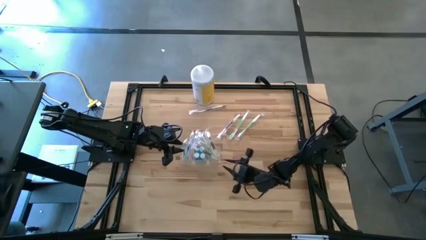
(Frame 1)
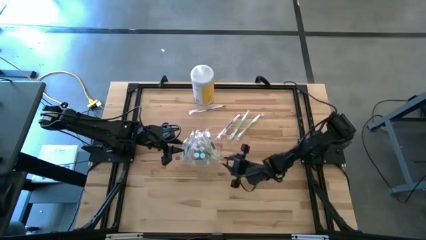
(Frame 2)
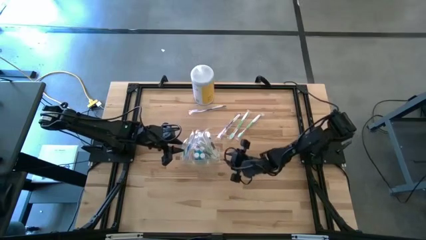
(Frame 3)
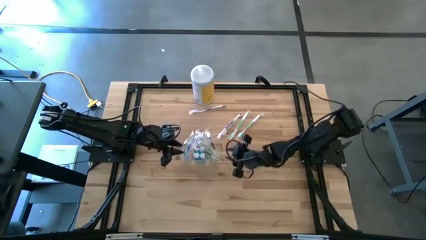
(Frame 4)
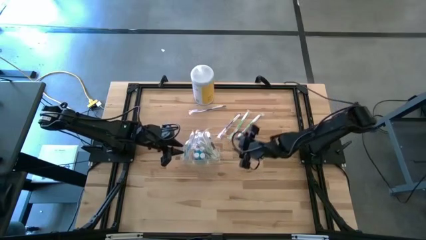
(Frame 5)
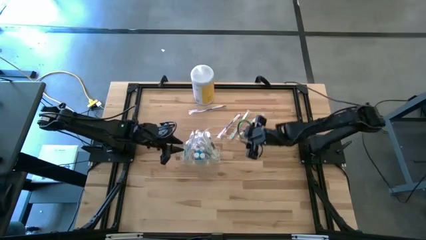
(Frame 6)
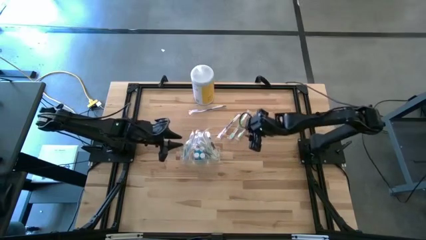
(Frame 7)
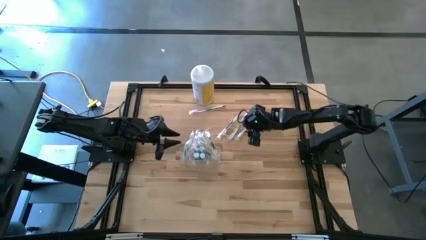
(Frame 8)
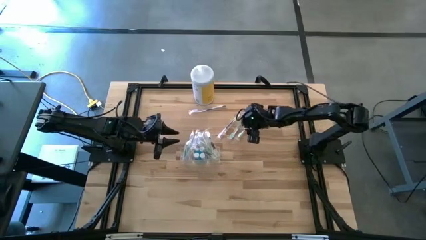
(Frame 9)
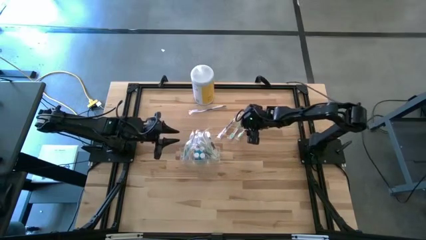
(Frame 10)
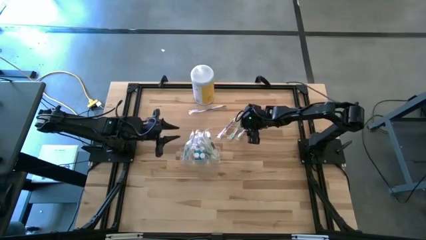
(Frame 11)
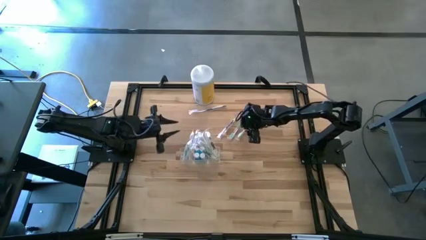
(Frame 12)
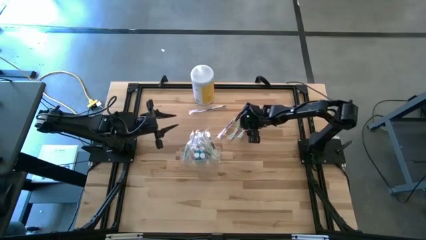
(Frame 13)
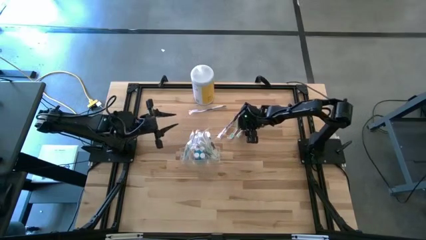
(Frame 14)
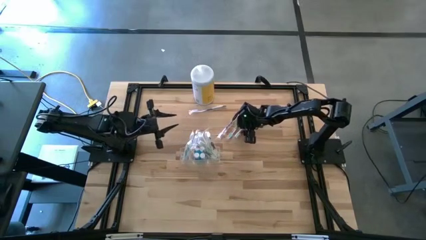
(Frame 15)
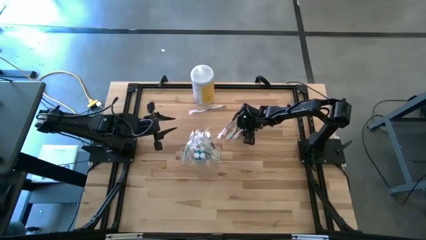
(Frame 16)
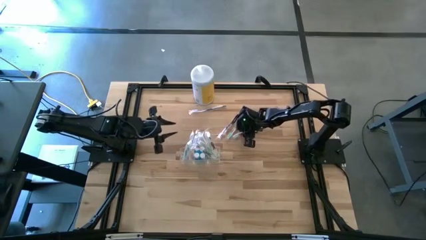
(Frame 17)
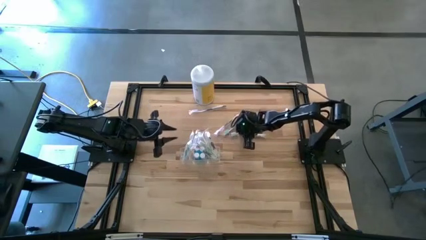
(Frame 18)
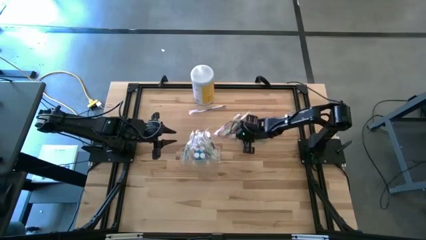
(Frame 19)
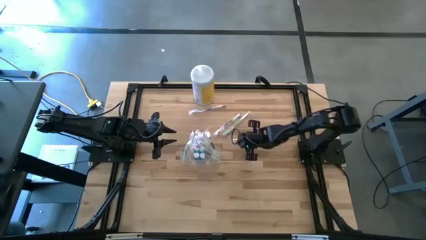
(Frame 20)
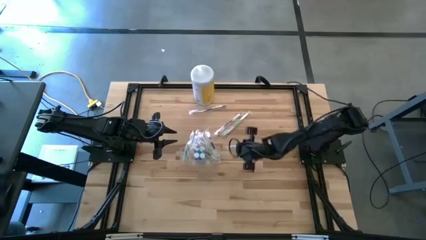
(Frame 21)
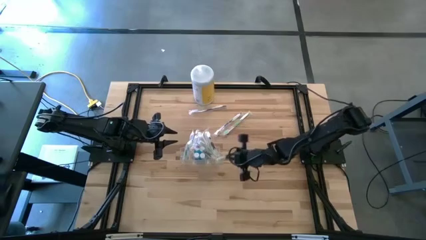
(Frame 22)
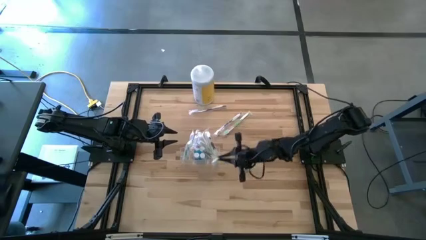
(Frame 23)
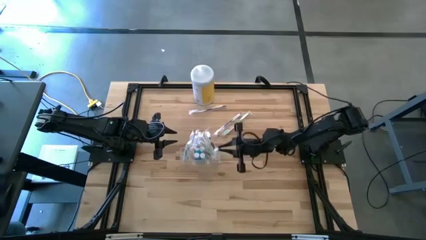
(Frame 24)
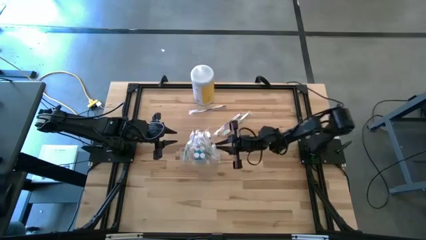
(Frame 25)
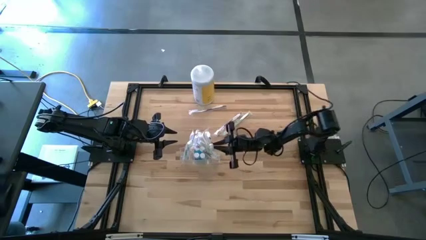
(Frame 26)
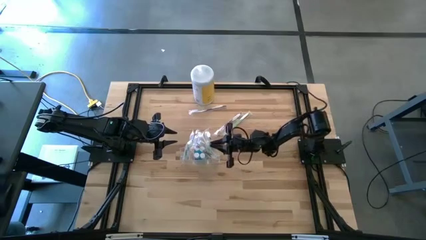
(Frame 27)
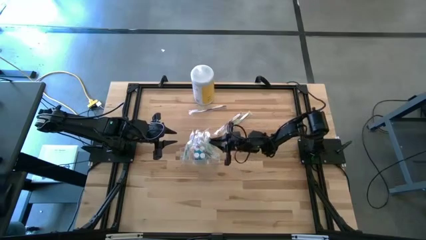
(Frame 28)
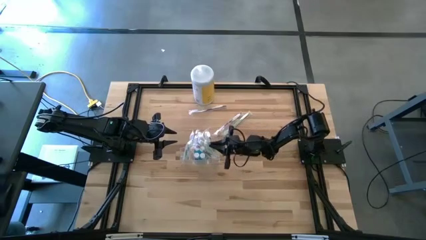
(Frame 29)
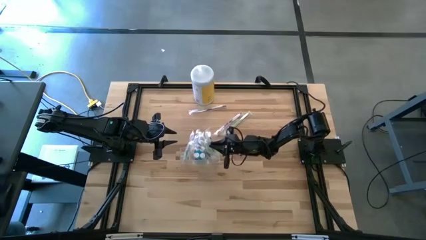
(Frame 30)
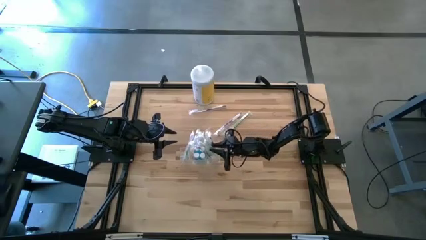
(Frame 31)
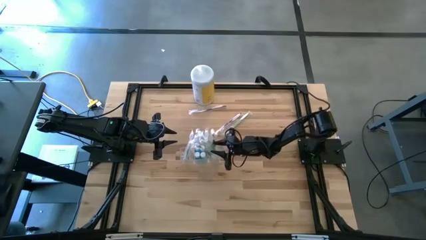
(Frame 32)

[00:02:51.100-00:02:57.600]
Task: Pick & Place toothbrushing station
Put the green toothbrush into the transparent organizer

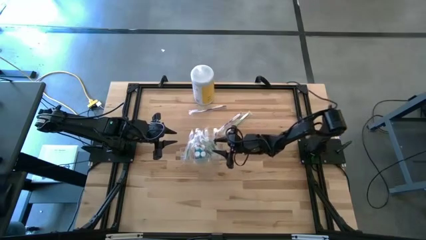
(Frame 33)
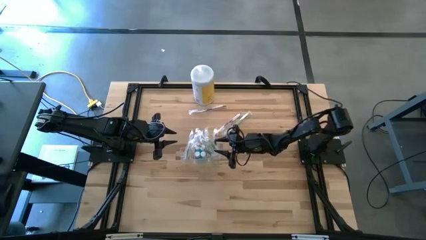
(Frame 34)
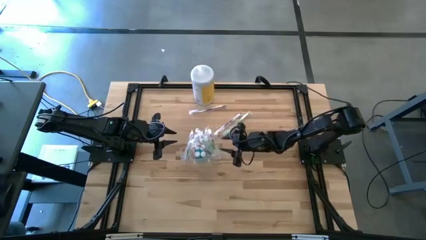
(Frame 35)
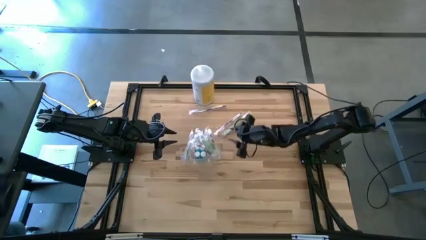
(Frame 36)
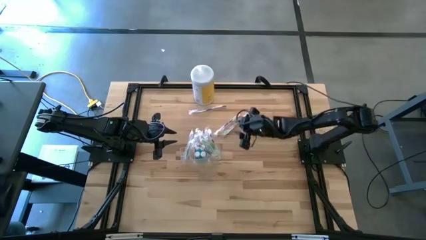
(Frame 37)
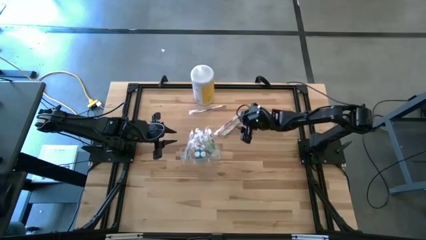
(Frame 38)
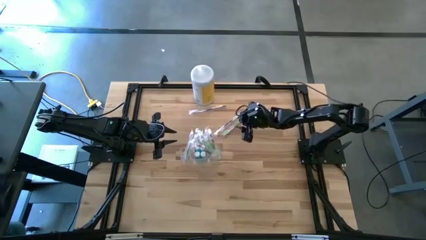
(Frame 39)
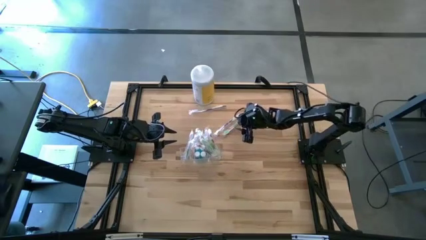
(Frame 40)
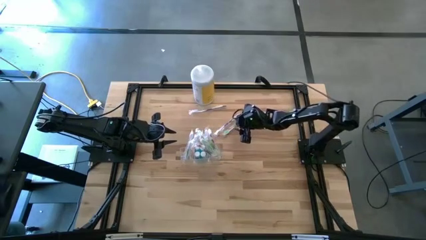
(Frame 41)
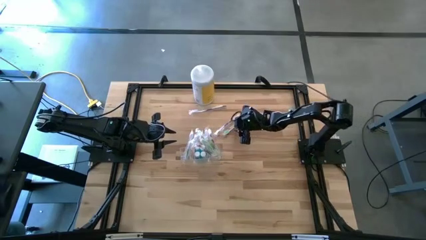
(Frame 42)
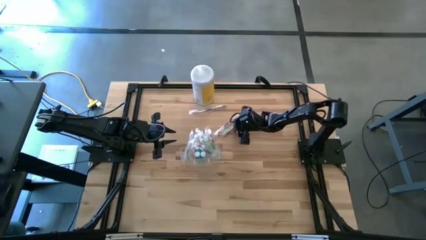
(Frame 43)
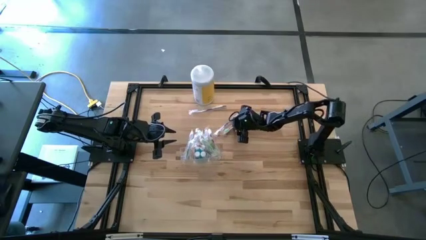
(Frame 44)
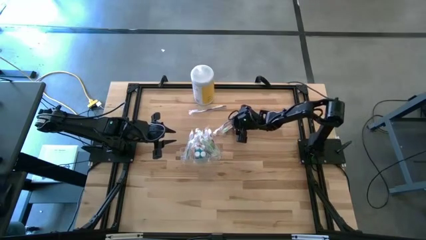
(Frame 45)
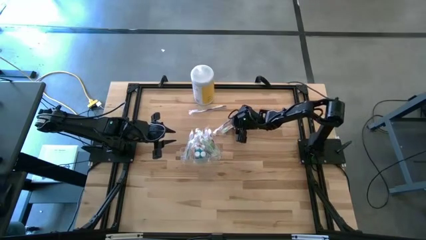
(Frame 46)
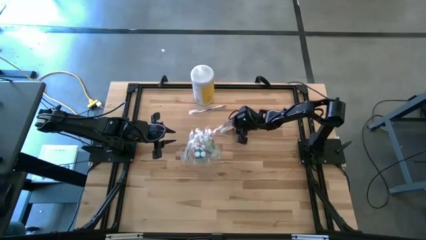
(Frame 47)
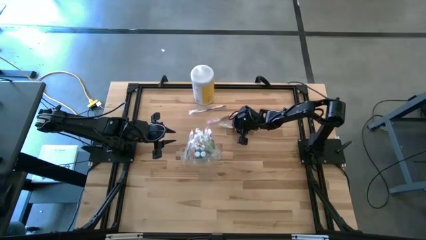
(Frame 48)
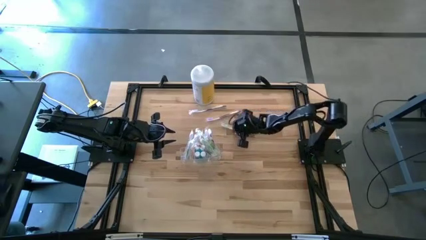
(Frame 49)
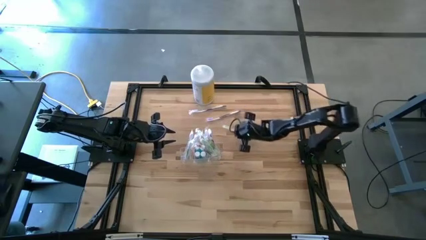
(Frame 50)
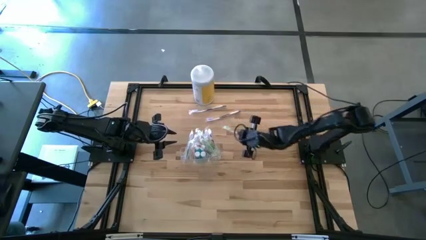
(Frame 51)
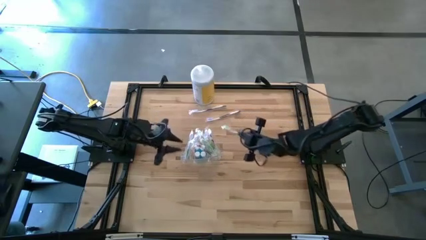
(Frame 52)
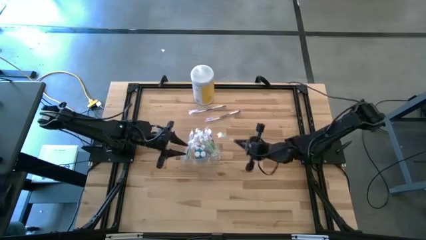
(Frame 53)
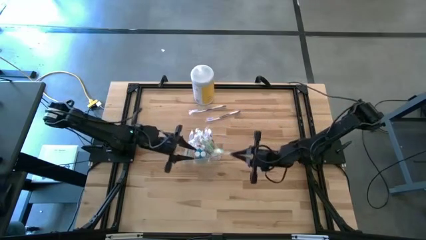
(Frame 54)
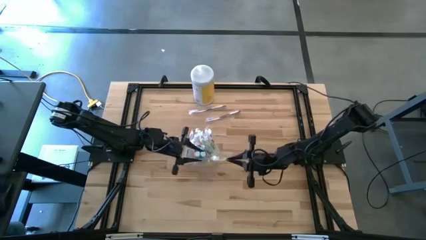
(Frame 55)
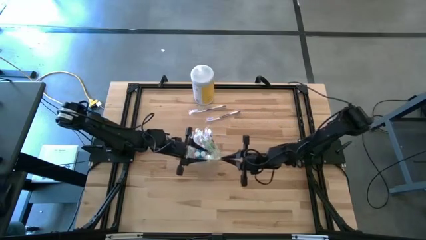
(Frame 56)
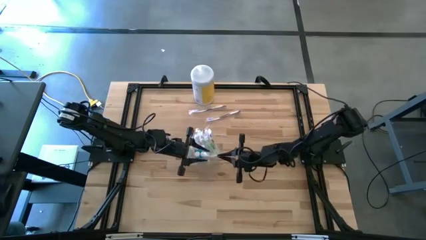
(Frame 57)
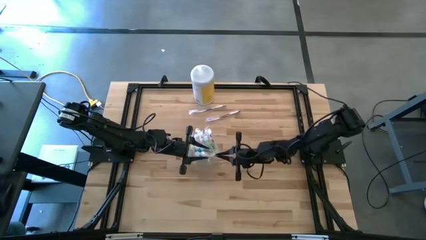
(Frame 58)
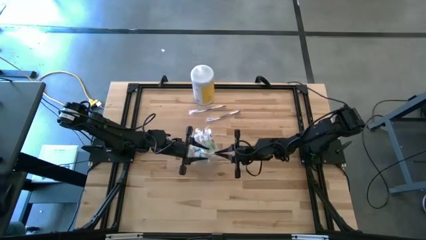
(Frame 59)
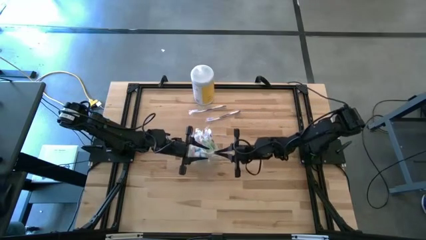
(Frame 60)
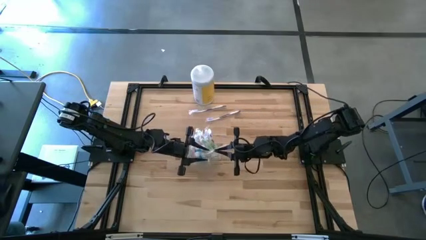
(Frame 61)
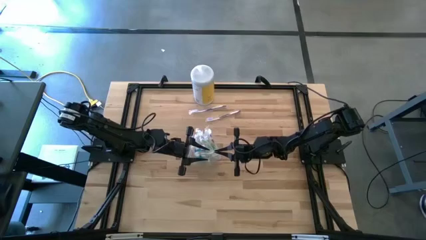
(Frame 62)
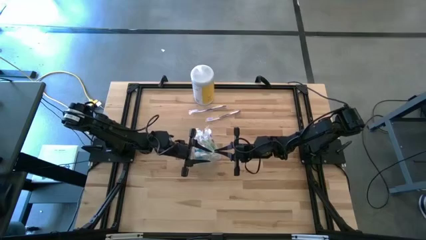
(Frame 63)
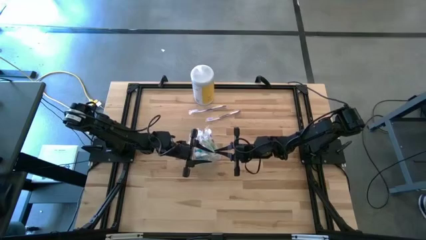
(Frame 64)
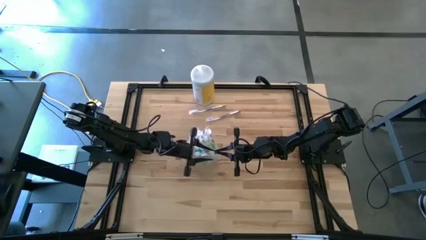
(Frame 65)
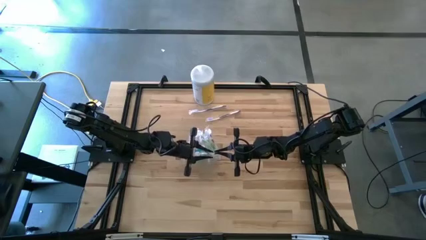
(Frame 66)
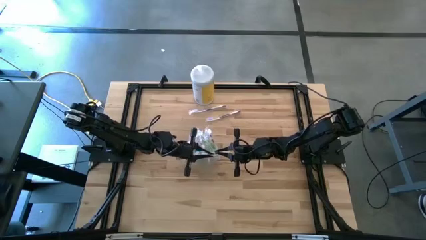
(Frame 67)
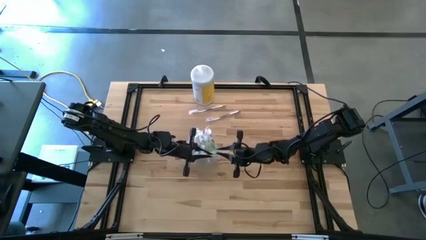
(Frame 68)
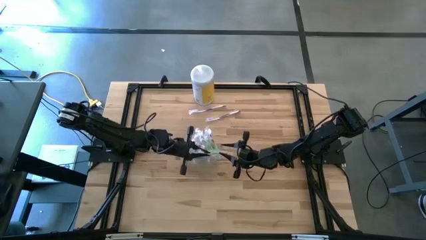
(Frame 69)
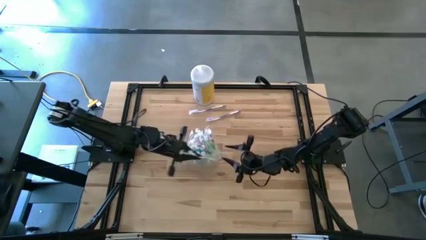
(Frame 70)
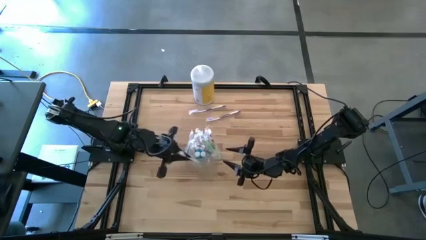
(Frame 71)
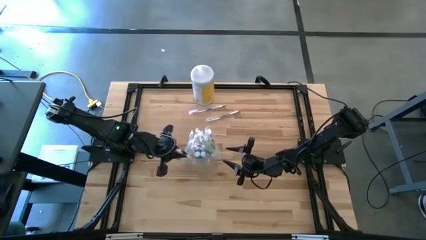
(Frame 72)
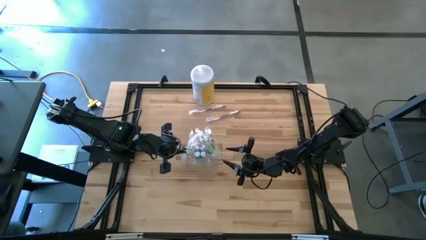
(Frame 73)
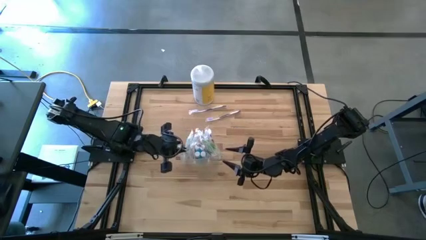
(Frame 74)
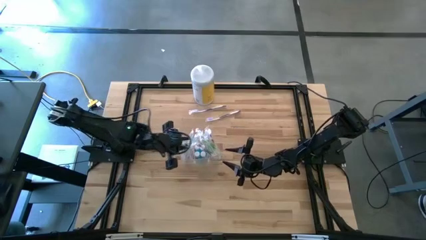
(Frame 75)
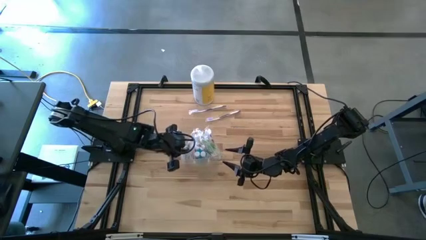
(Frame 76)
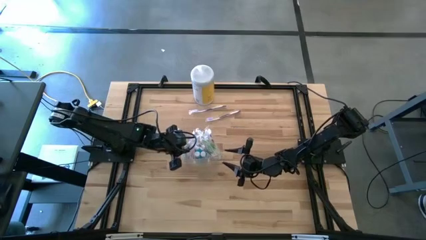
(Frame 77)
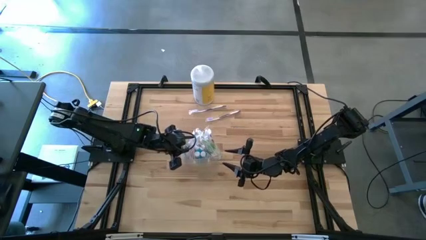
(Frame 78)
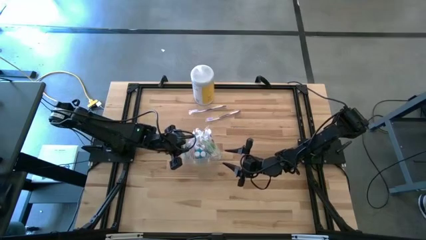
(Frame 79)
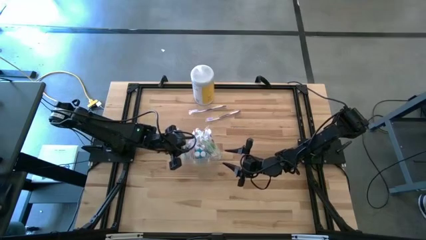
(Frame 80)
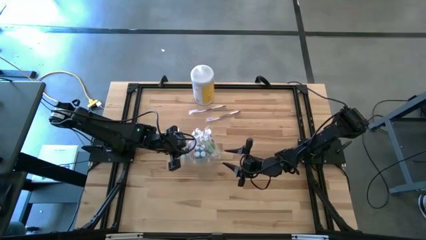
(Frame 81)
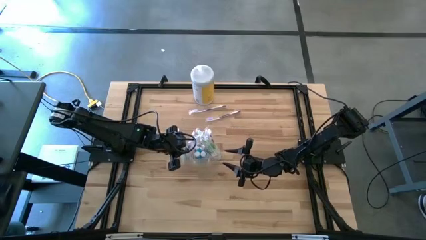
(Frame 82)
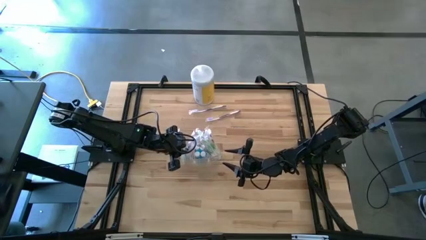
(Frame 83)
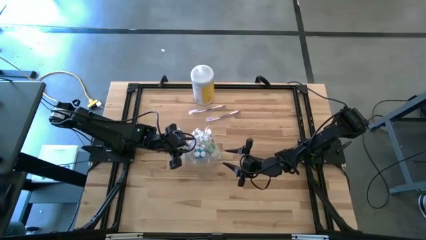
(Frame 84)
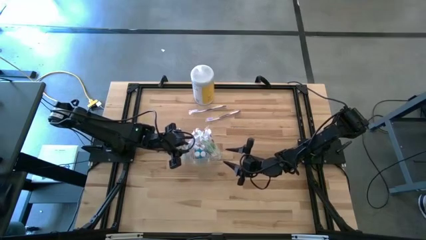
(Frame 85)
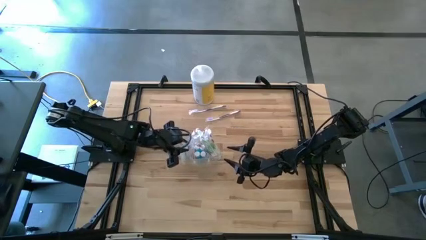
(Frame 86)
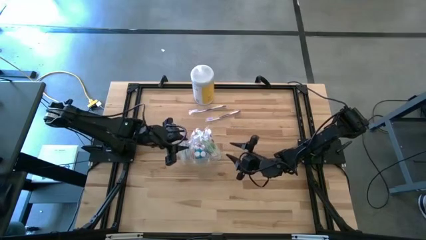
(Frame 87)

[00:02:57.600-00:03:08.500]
Put the green toothbrush into the transparent organizer
